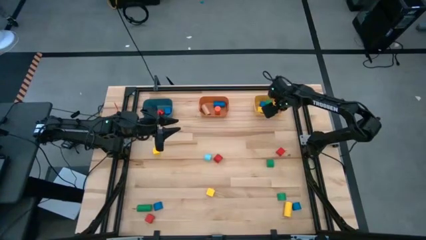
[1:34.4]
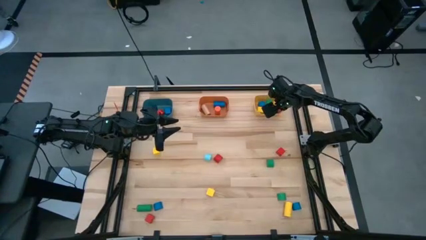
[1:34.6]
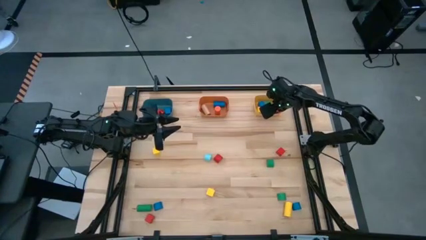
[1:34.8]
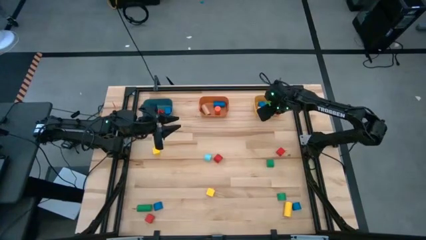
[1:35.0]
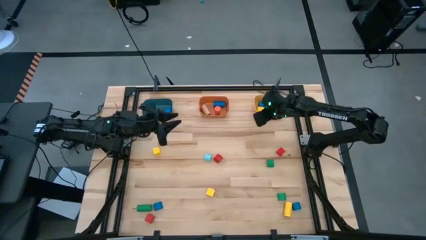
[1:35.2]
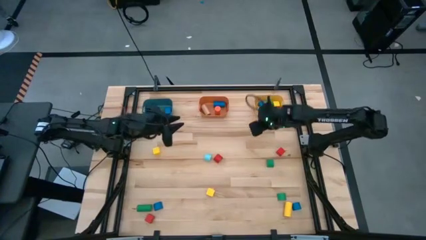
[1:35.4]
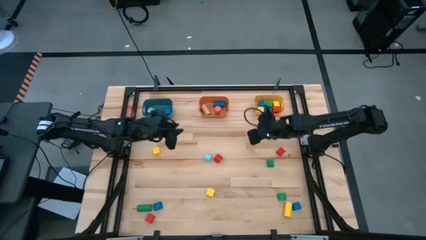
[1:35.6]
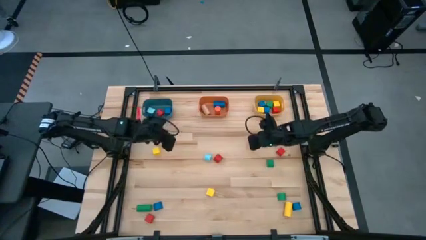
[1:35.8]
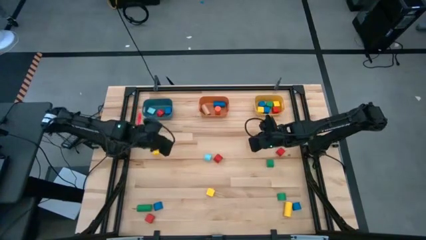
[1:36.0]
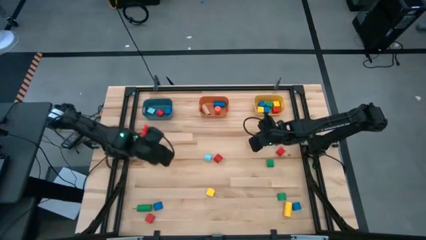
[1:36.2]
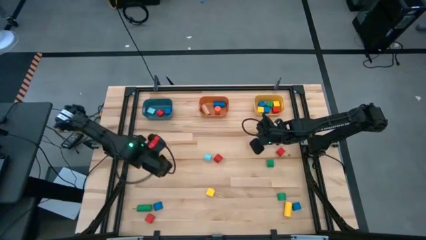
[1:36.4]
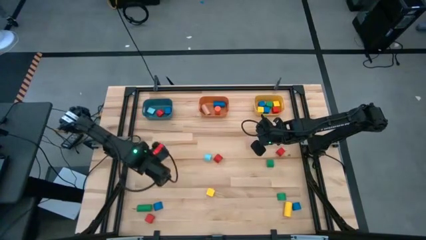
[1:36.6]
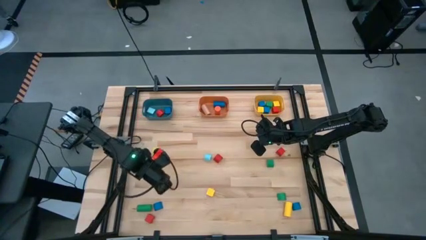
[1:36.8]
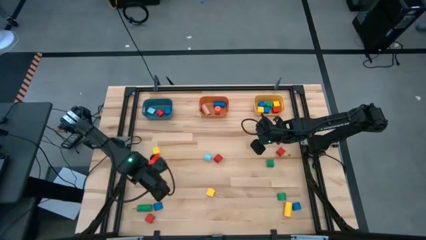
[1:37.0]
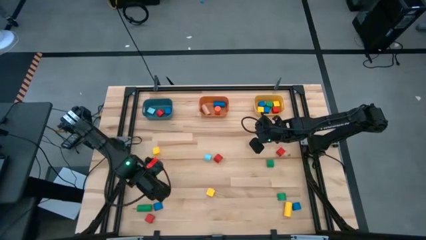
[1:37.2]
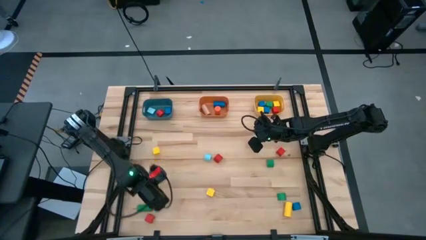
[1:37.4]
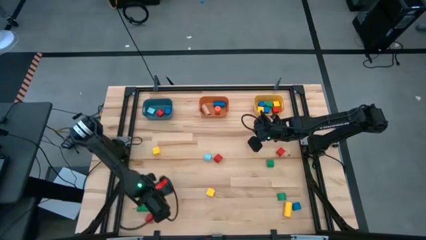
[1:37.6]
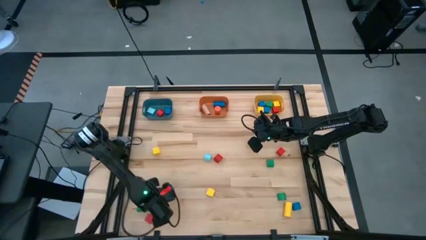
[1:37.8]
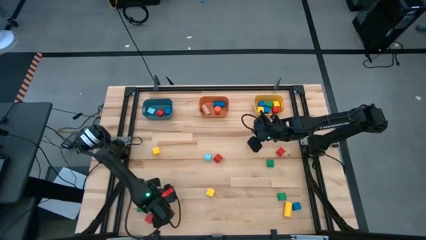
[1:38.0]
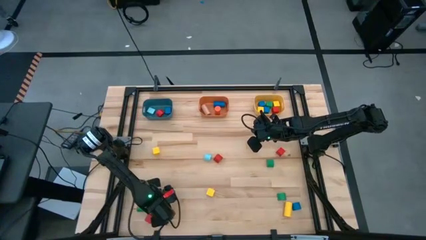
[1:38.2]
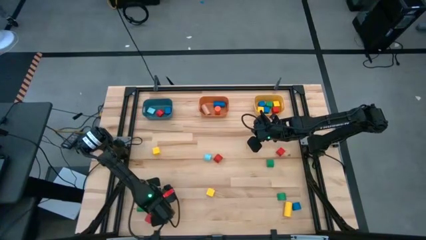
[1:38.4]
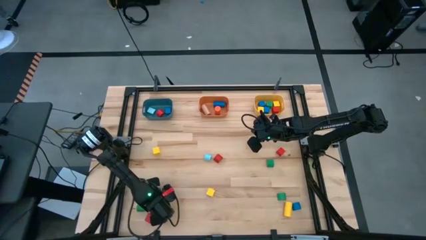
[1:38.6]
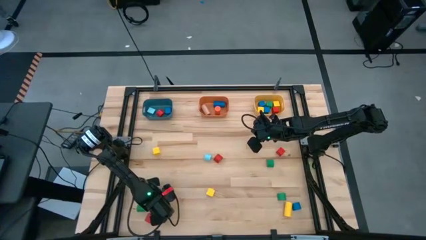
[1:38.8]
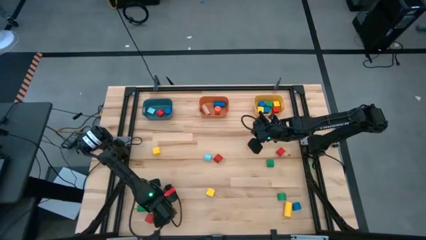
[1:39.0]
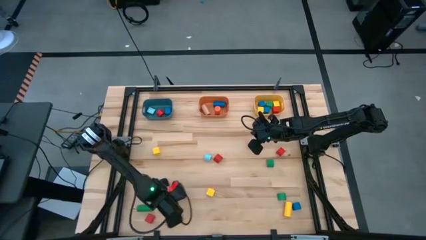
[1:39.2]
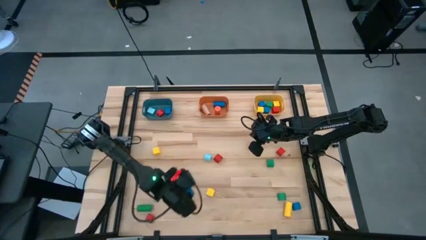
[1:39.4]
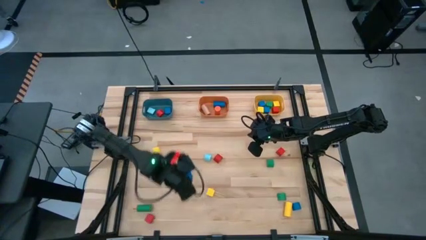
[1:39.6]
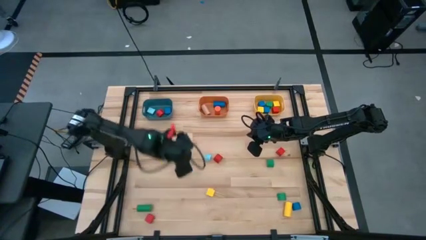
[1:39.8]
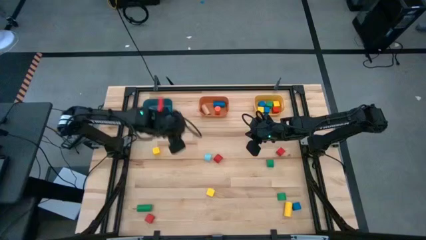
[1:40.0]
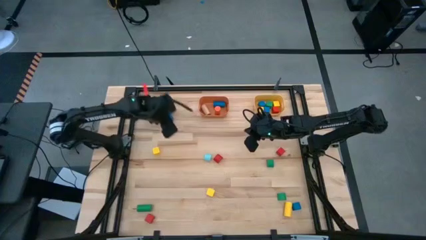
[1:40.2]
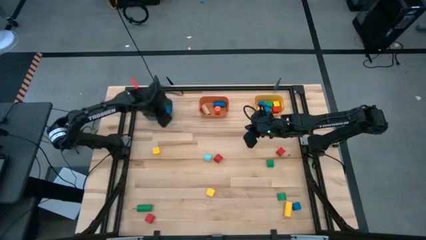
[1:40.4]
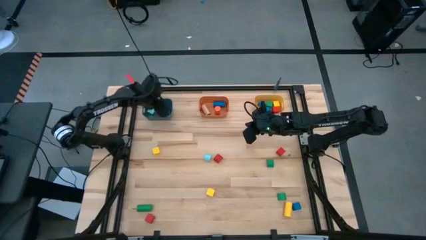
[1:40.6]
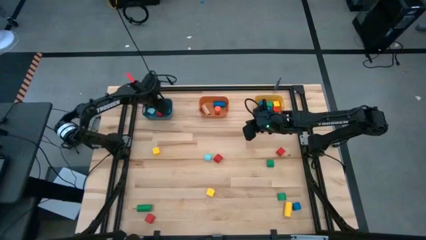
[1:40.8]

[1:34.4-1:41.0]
Task: Sort blocks by size
Put the blue half-circle block into the blue bin

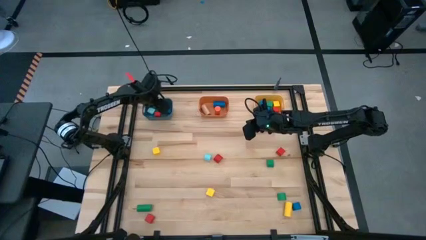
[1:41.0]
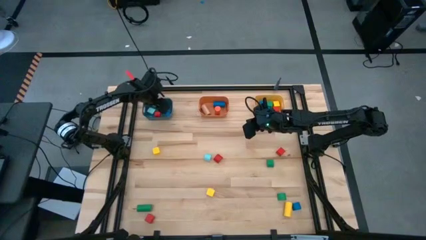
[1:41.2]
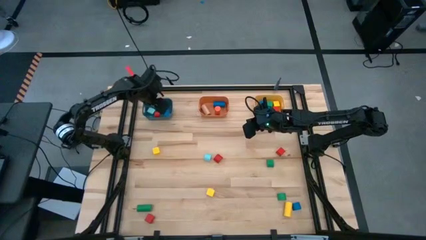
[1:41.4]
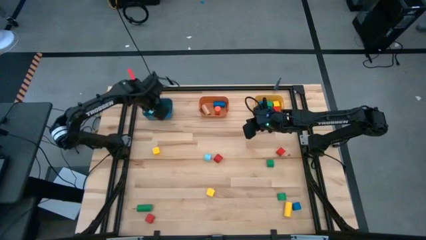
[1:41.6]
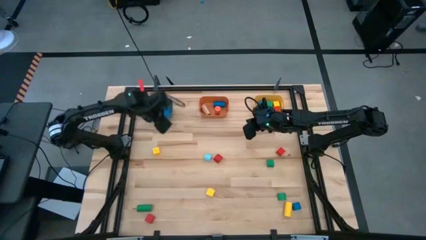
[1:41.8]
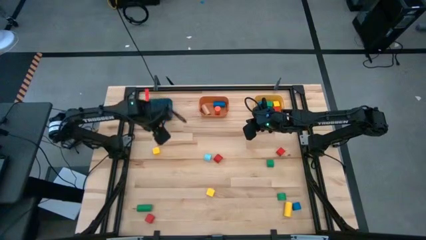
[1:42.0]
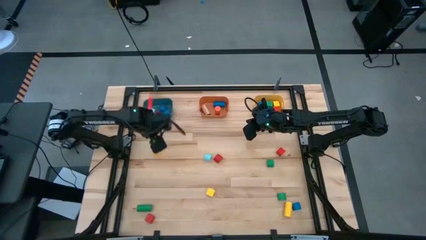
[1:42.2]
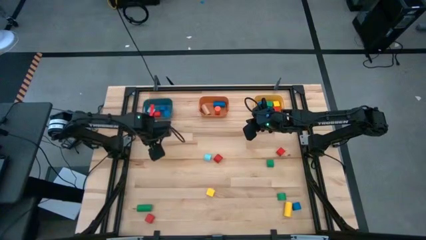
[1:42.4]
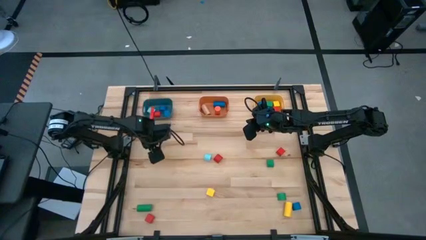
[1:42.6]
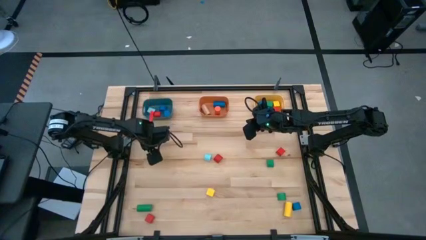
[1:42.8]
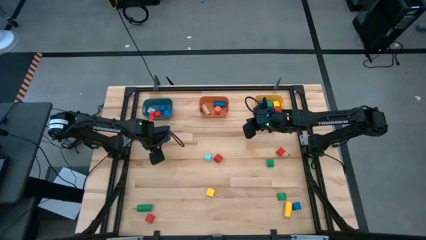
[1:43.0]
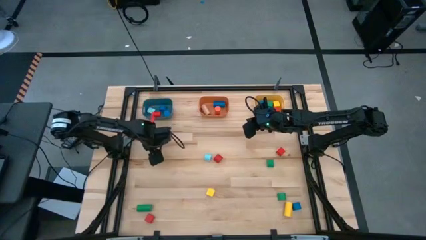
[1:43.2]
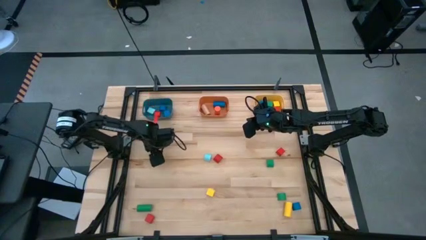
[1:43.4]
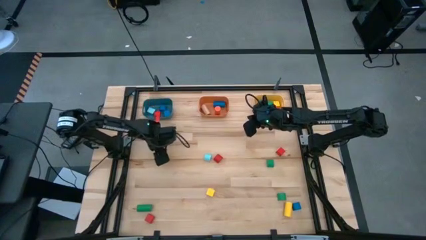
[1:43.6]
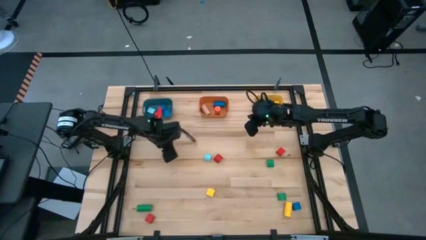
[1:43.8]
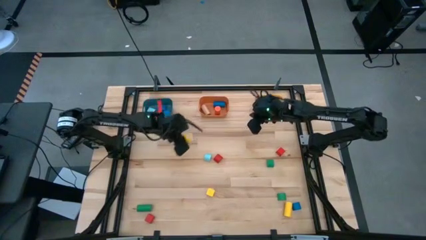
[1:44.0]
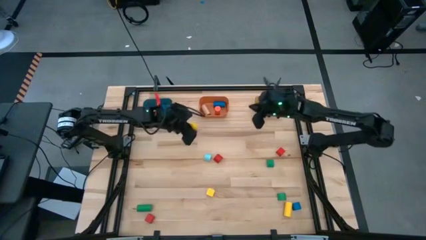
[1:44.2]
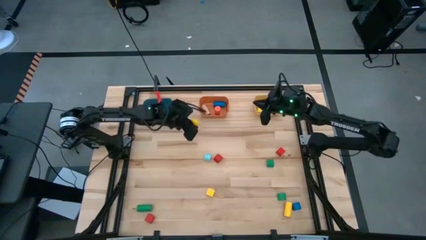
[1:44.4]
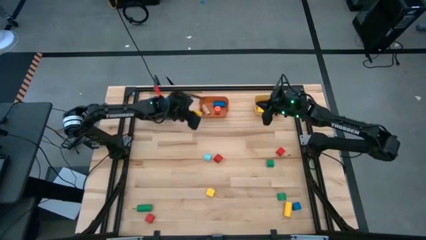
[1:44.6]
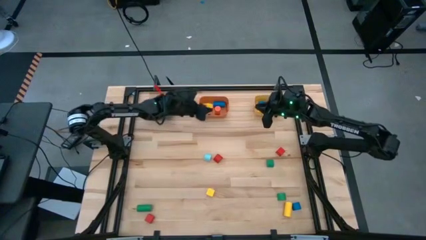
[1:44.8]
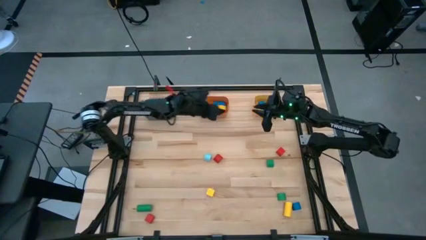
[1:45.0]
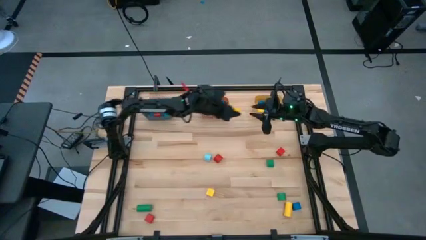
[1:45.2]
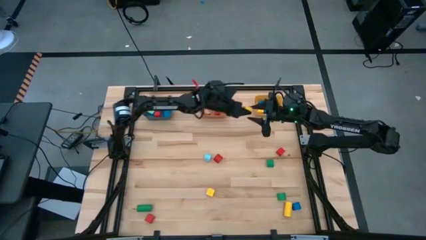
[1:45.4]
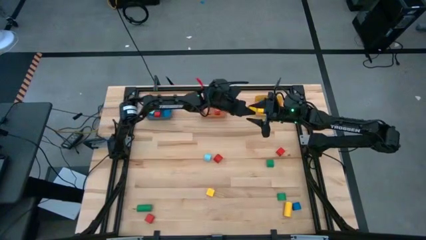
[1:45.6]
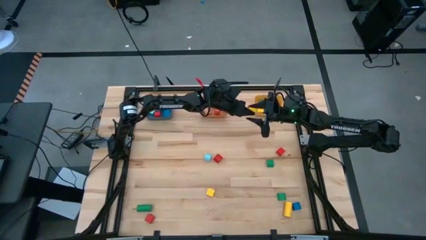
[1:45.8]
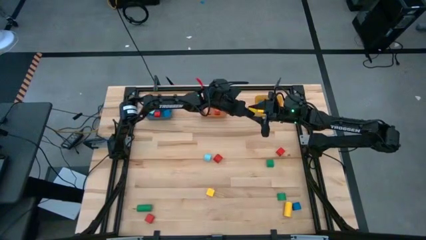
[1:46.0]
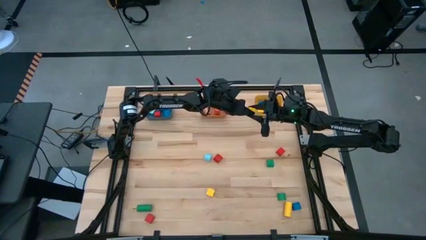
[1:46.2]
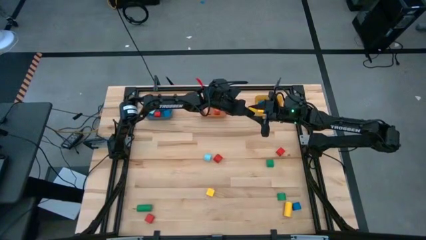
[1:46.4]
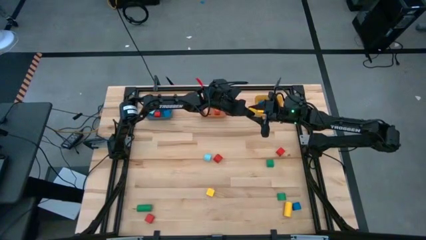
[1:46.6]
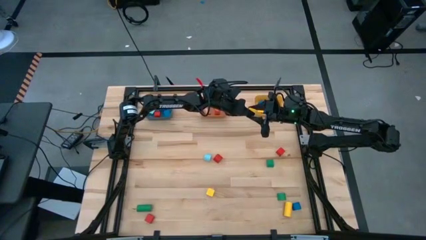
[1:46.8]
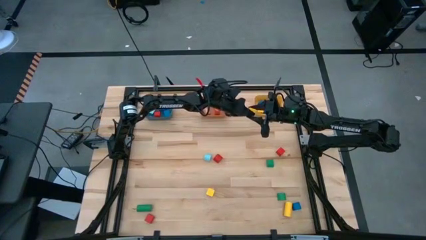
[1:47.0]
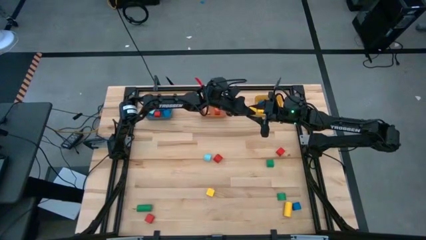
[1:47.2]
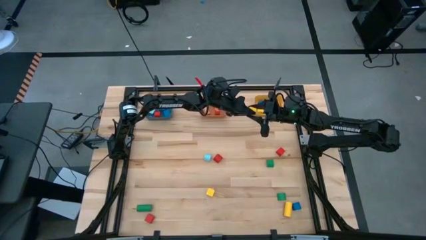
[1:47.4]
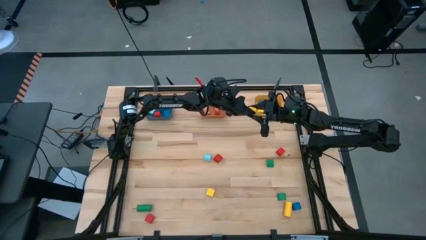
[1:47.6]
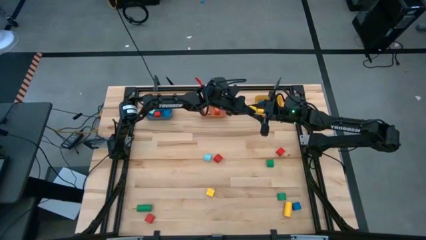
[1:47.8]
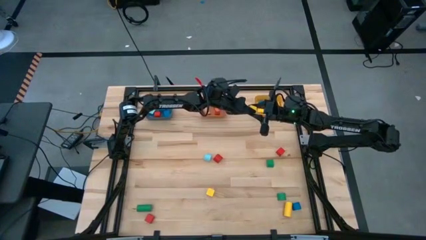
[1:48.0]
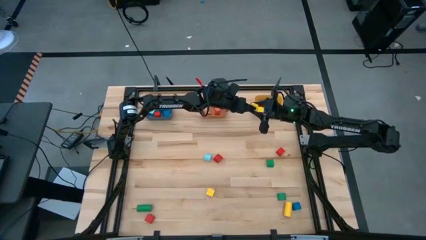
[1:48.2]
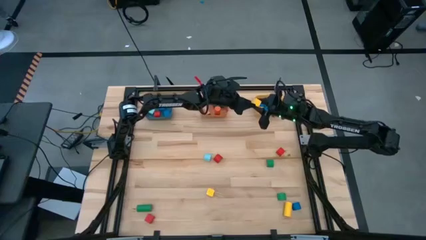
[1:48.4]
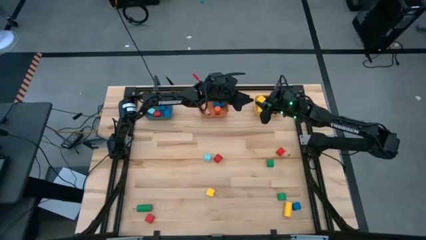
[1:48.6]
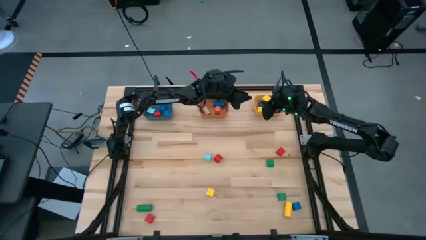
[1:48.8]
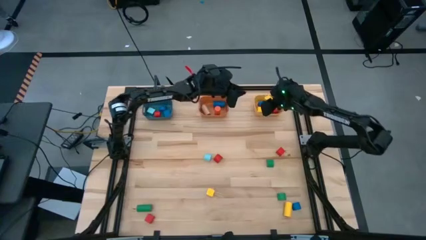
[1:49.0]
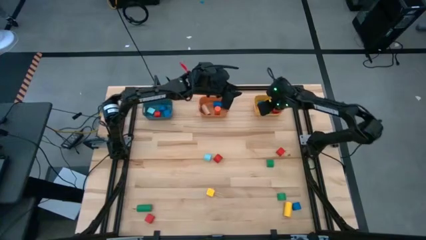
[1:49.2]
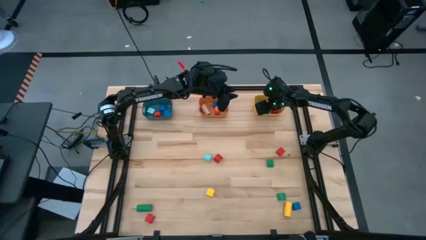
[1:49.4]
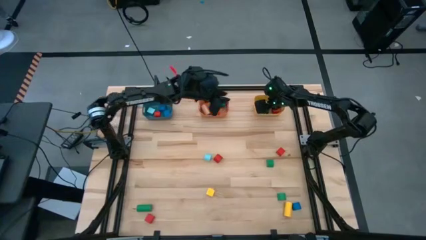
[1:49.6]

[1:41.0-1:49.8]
Put the yellow cube block into the yellow bin

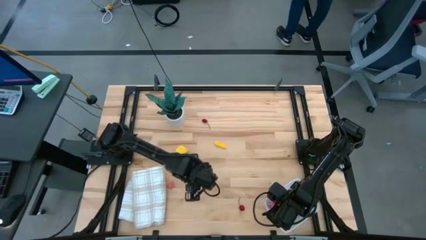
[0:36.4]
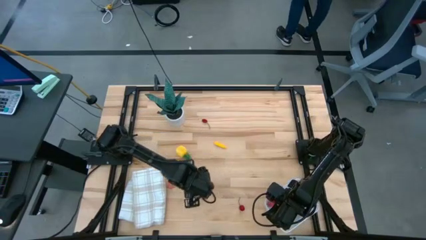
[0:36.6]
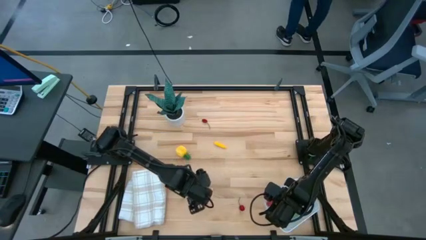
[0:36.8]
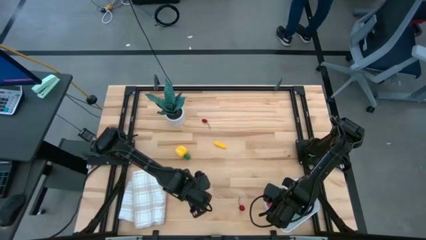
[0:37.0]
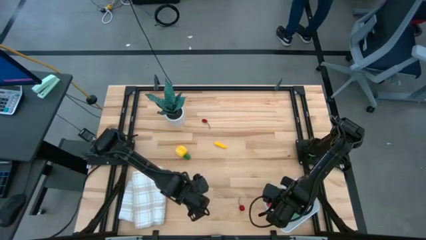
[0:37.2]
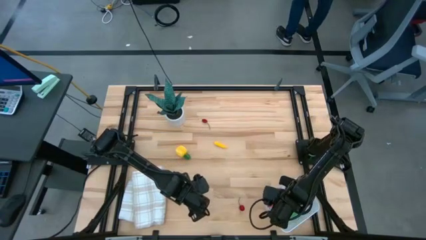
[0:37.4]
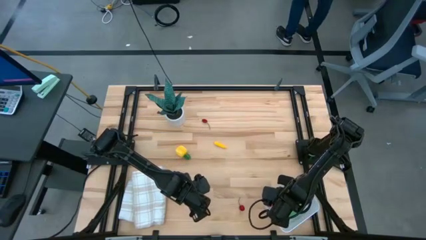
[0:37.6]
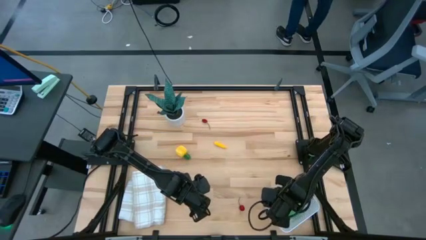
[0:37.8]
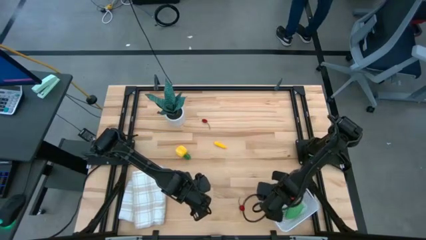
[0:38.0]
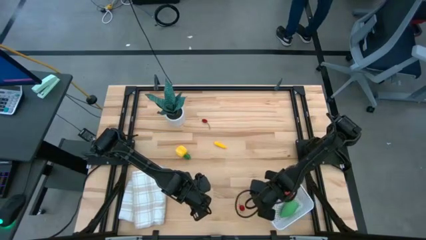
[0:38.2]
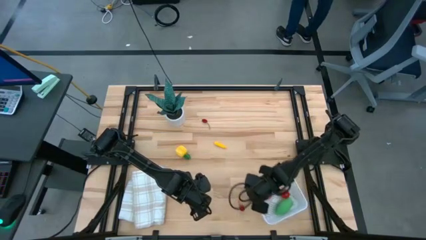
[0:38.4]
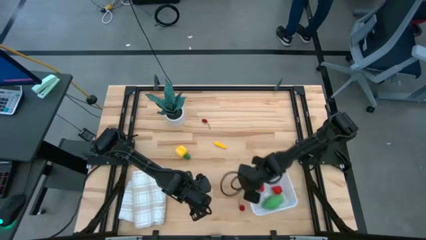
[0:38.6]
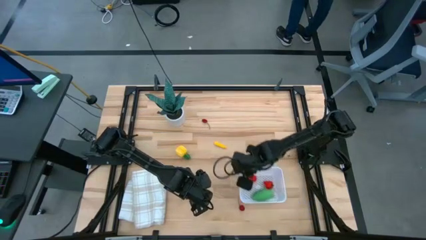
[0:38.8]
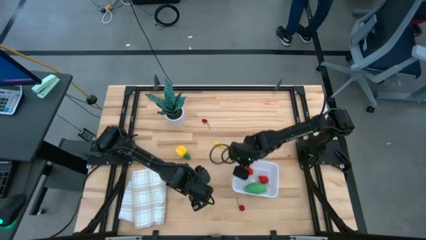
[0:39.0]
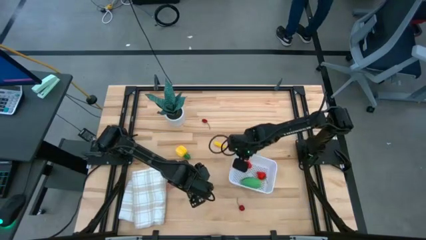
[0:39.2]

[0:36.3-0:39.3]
Task: Pick and placing Produce into tupperware
Move the white basket to the center of the table
